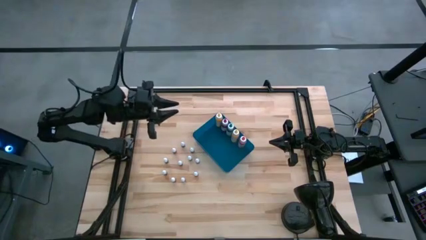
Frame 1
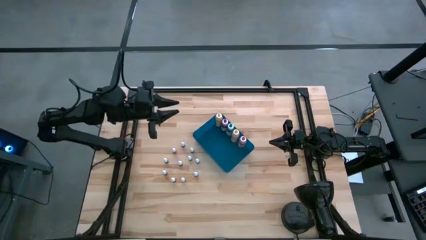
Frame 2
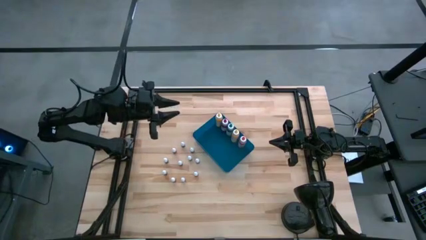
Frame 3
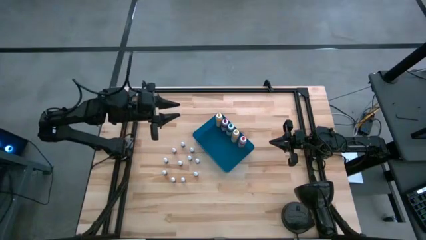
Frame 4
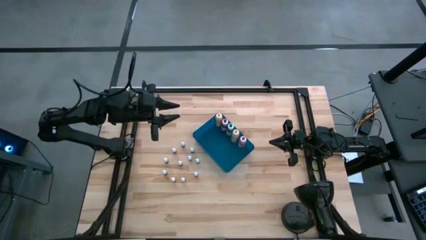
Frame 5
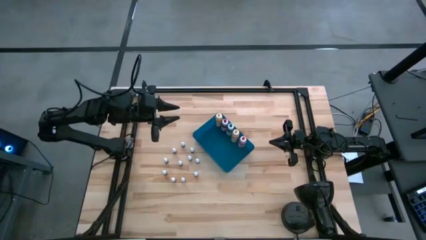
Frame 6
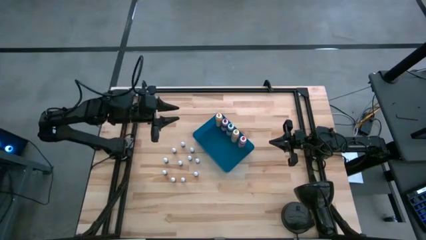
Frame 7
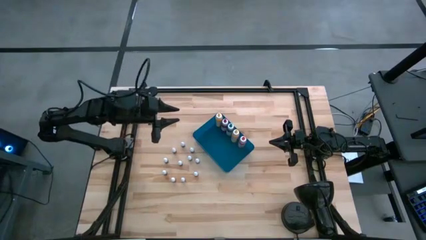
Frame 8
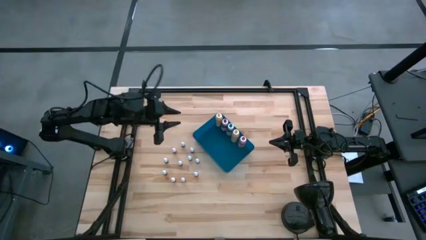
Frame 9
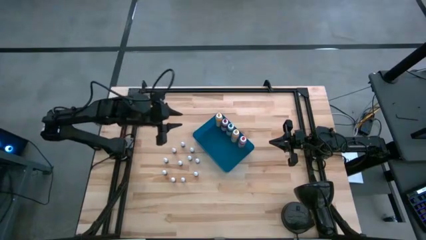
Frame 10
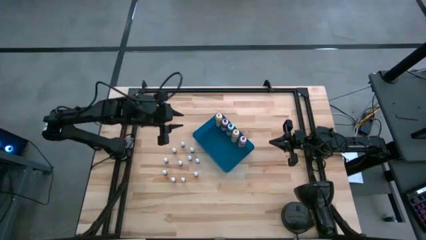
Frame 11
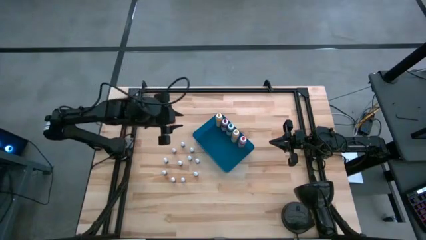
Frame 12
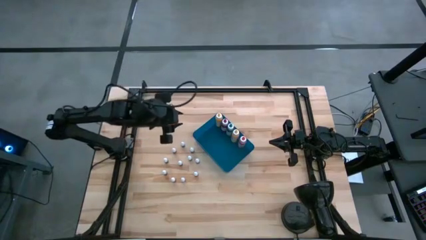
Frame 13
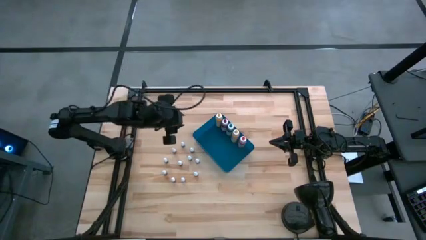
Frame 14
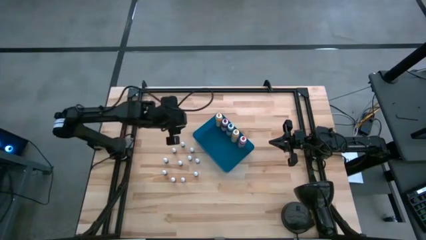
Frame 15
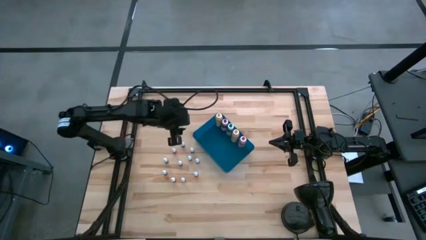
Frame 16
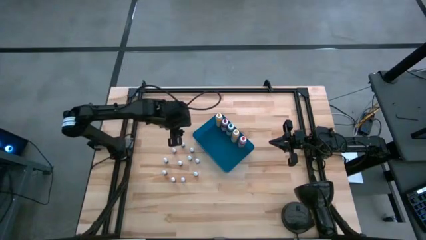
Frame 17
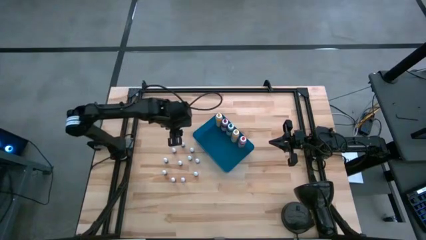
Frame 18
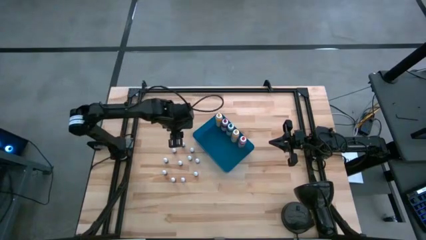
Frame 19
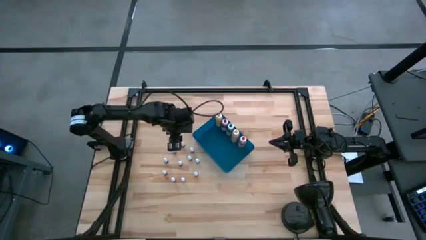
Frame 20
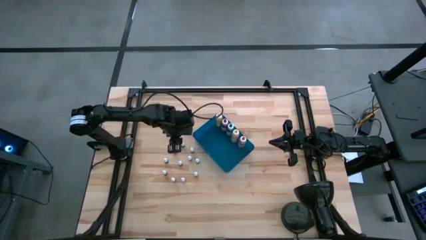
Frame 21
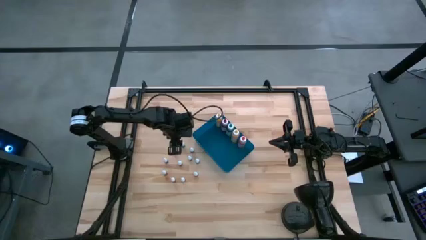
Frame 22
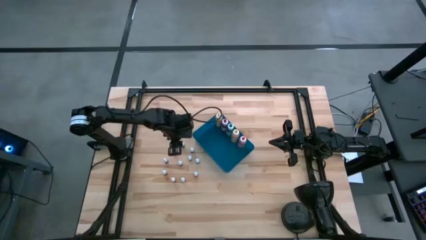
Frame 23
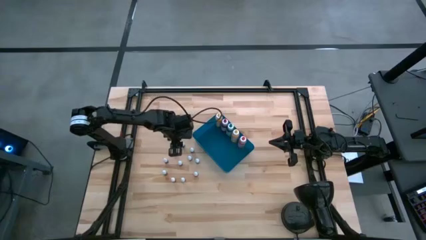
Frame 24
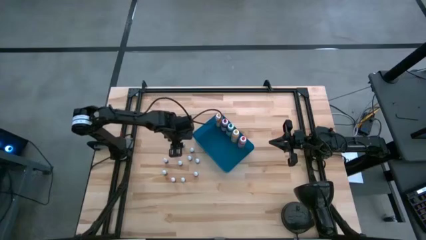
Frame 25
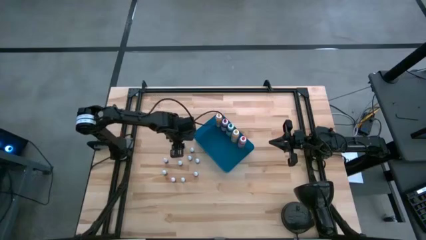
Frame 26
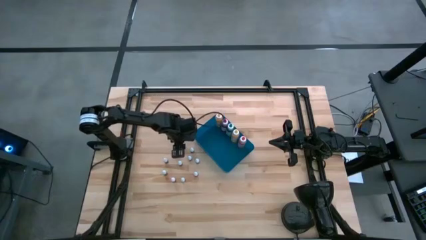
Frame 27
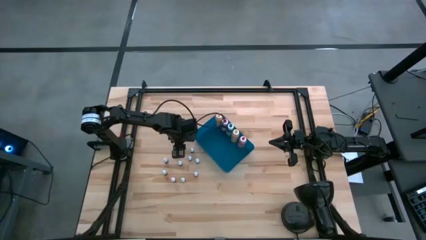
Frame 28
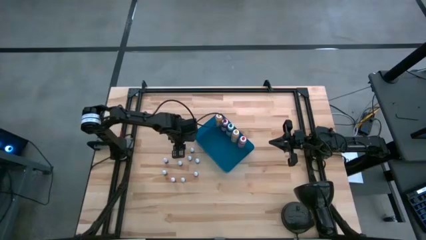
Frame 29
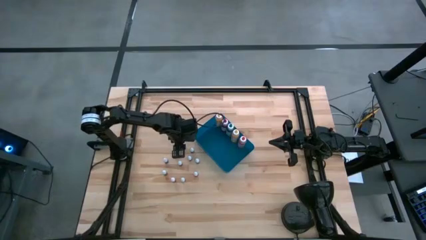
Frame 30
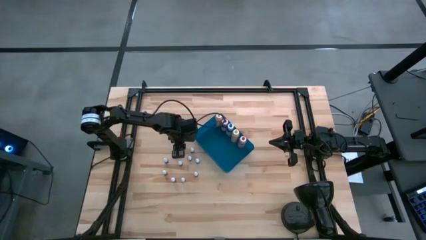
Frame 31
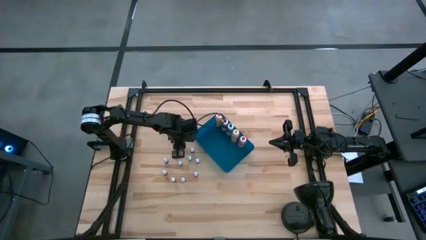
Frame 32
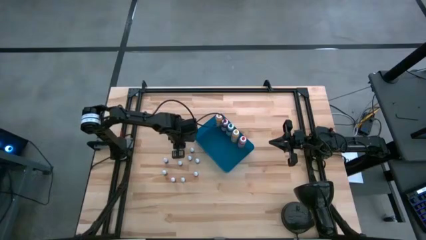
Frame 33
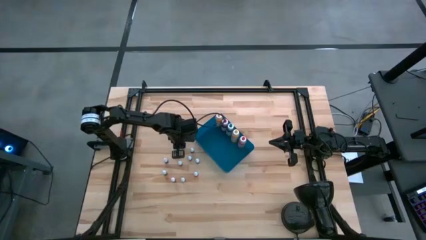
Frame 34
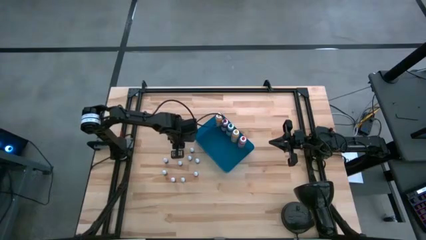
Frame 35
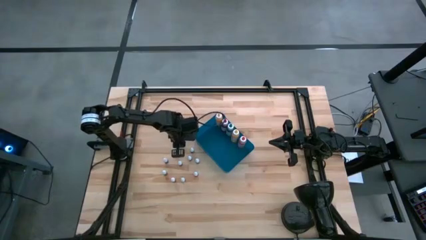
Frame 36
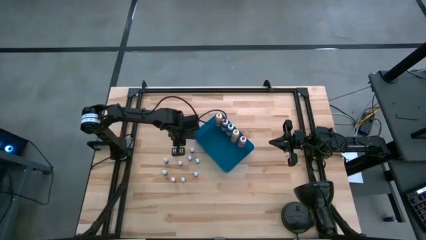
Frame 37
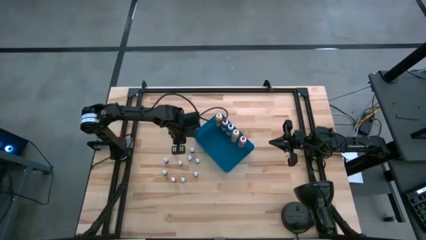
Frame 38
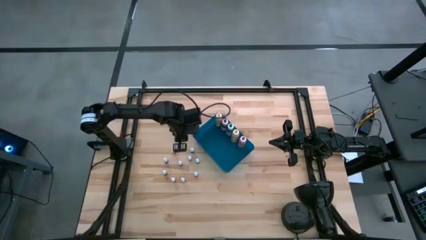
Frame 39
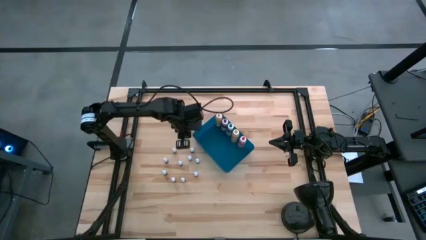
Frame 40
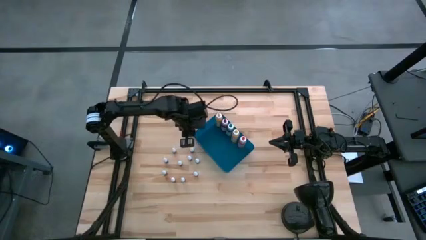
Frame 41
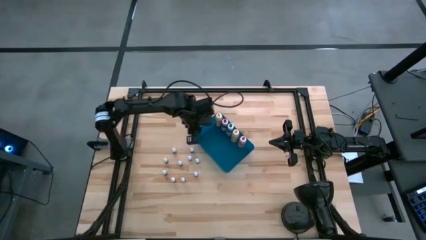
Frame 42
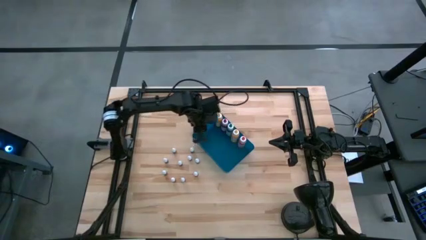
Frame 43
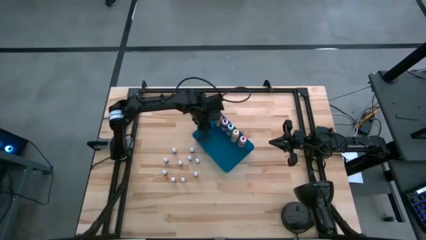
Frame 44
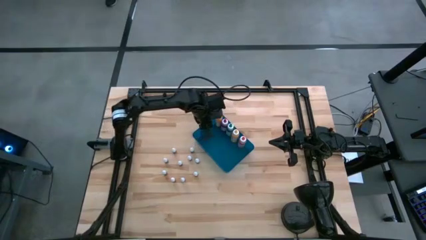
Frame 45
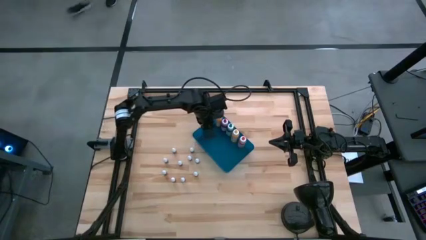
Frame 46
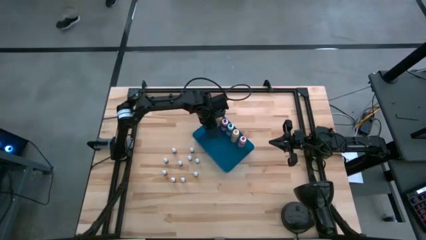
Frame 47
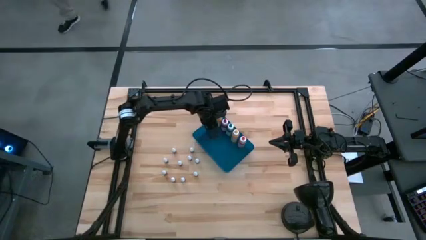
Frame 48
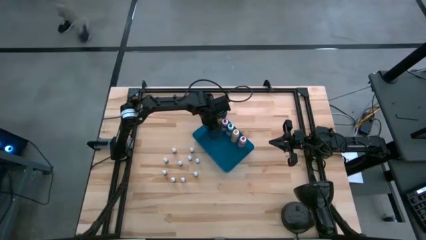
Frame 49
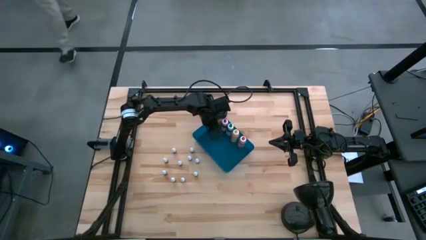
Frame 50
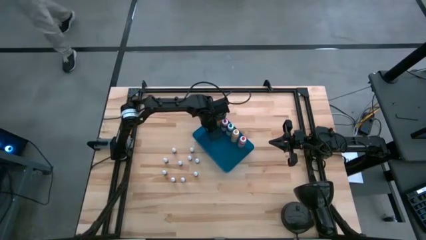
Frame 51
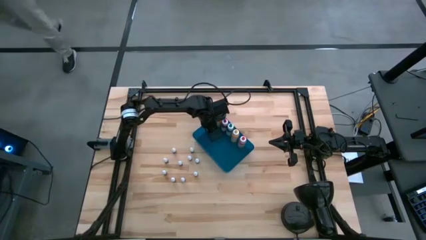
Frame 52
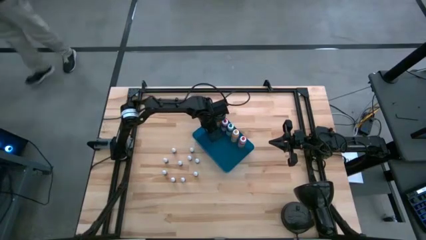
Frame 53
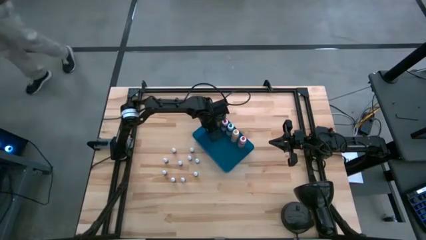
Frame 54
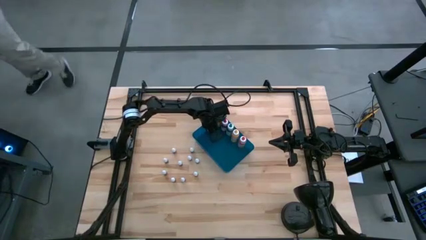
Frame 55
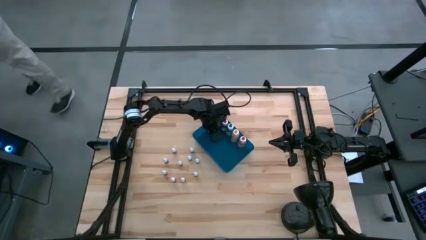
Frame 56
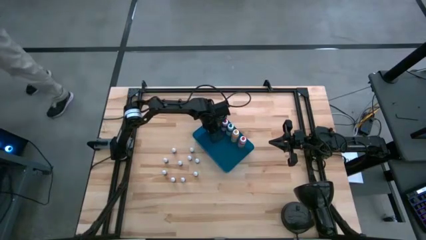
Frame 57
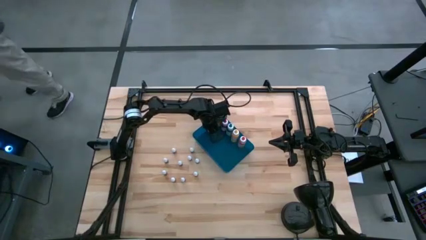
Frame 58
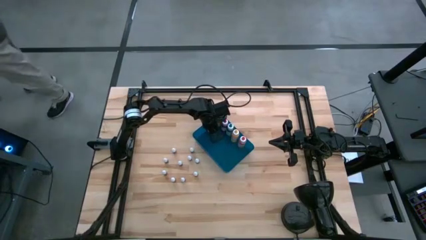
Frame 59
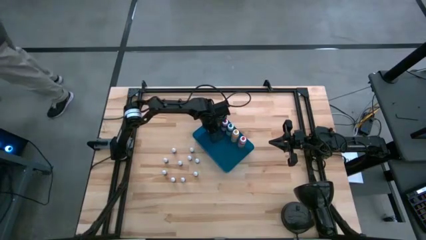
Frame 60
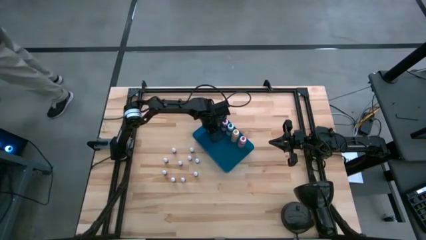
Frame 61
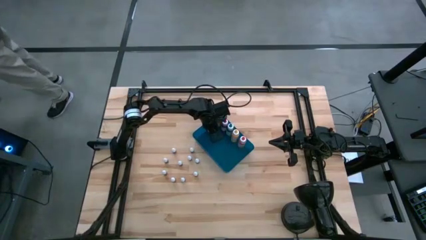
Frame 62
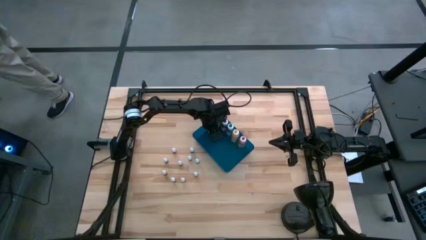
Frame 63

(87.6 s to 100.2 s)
Task: Pick & Place food coloring
Put the green food coloring bottle into the blue bin

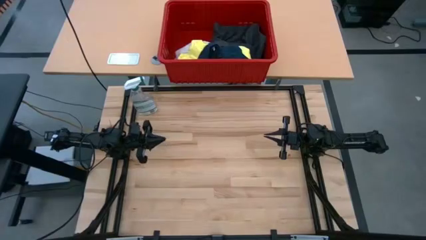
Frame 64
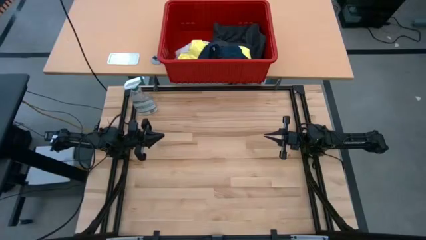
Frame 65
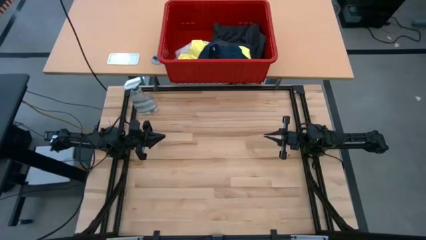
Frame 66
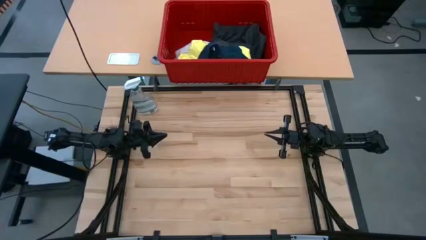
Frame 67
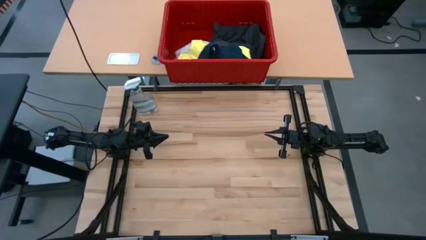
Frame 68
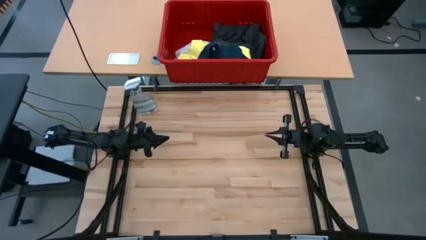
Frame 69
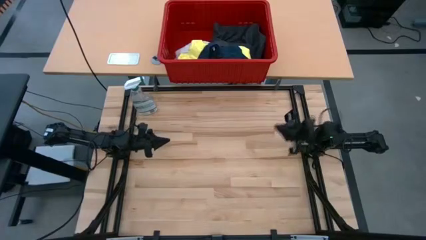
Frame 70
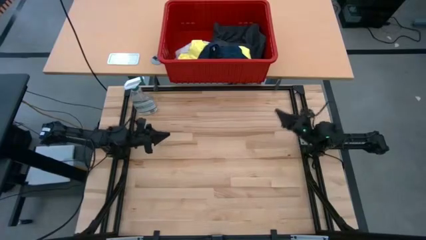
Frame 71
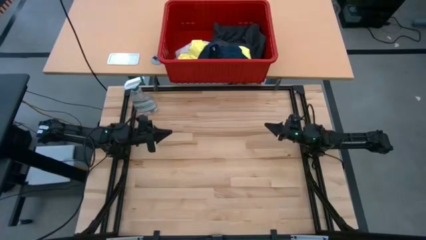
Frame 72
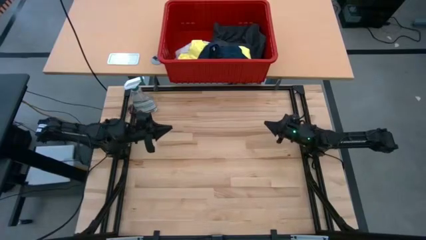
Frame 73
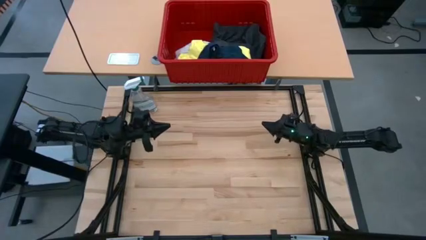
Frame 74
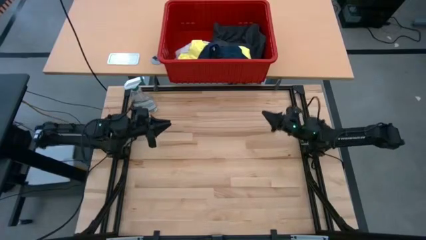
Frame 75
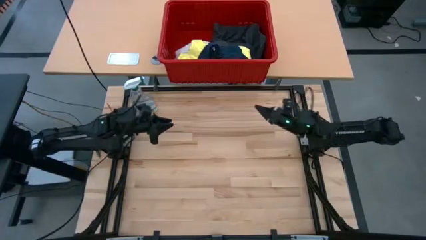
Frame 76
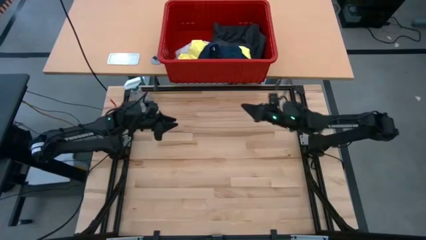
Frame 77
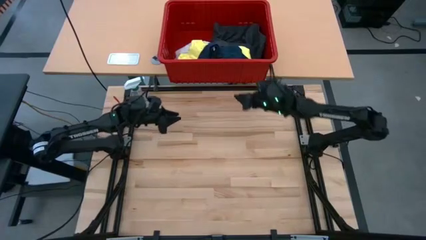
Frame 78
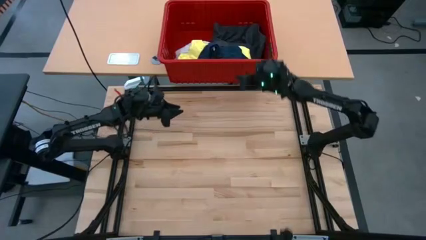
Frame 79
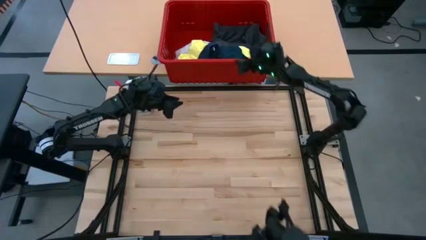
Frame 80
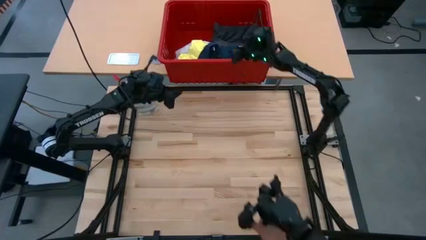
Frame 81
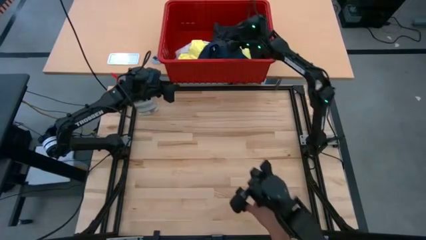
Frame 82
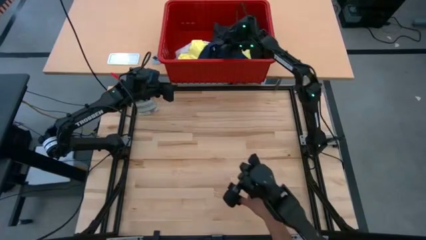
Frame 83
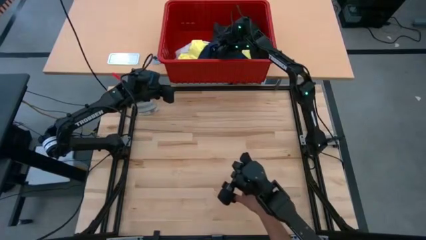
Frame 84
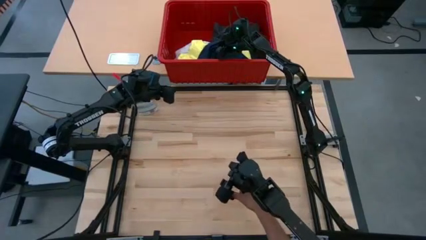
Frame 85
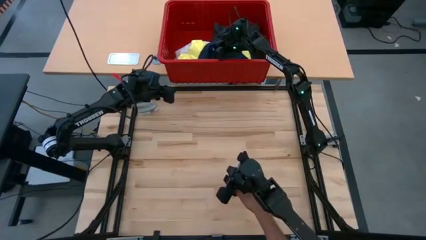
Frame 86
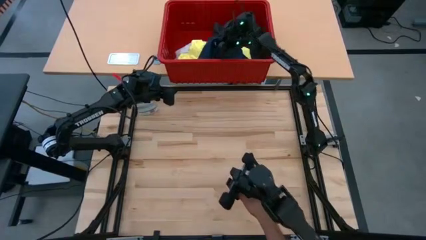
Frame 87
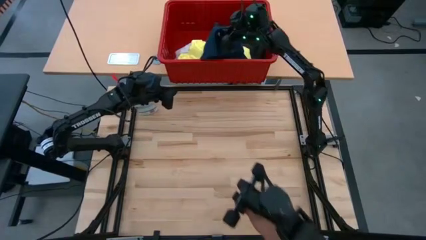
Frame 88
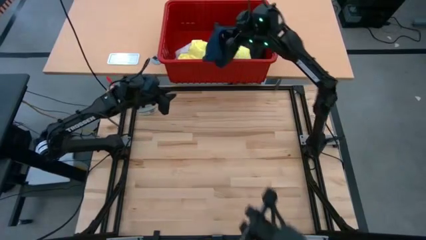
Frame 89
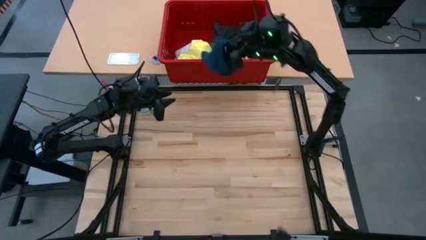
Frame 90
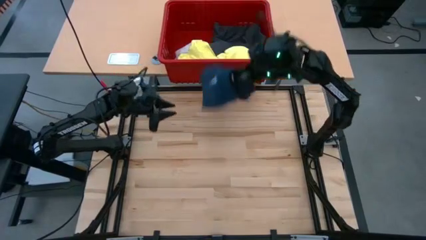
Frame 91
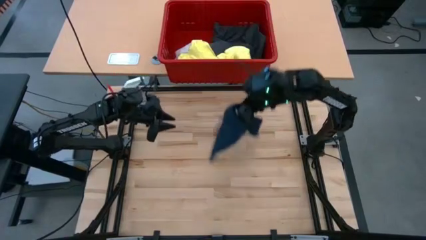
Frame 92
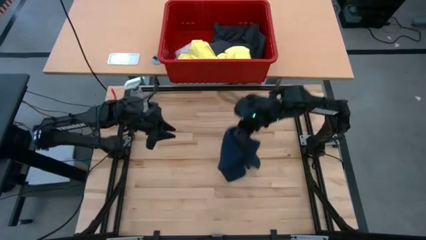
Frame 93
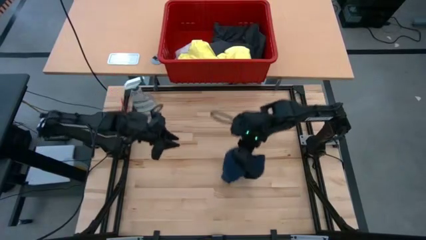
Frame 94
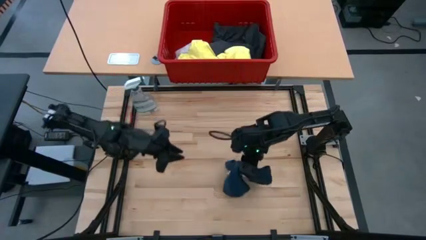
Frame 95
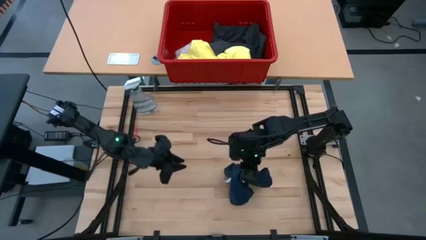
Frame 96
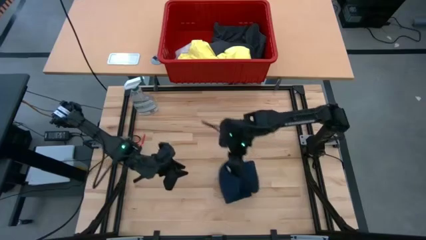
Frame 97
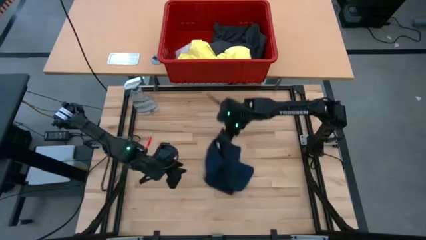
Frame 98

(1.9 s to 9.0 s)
Task: Fold laundry
Remove the dark blue shorts from the red laundry bin
